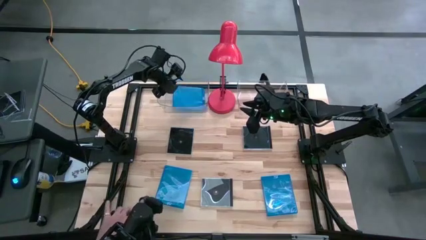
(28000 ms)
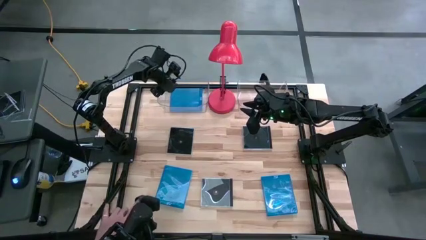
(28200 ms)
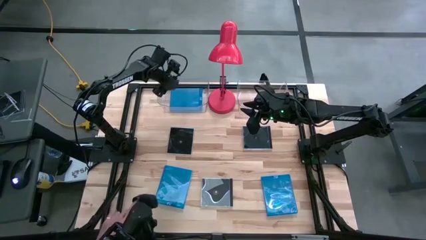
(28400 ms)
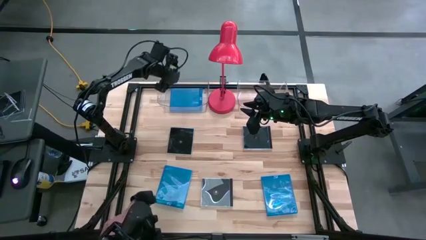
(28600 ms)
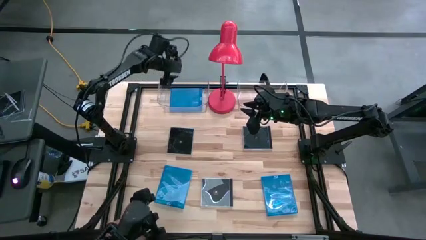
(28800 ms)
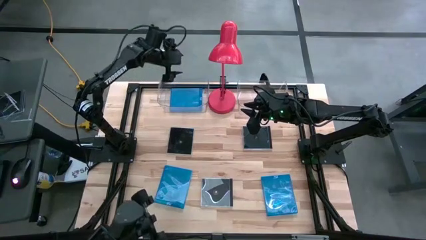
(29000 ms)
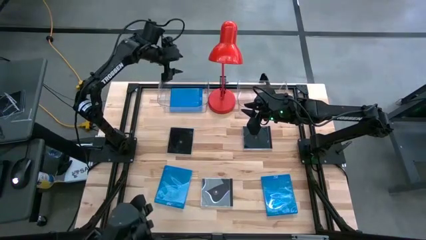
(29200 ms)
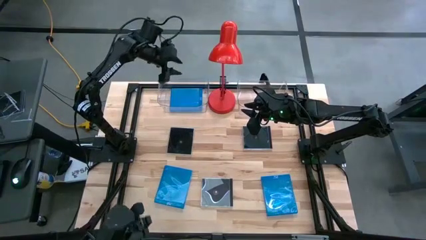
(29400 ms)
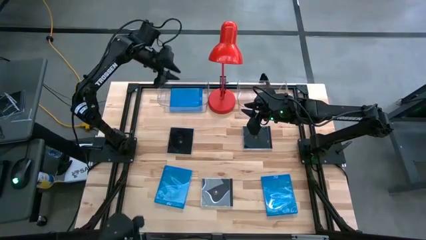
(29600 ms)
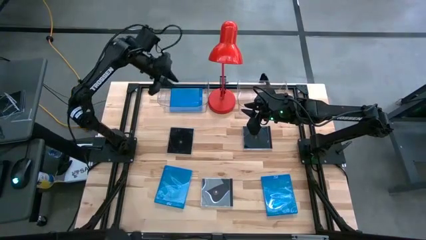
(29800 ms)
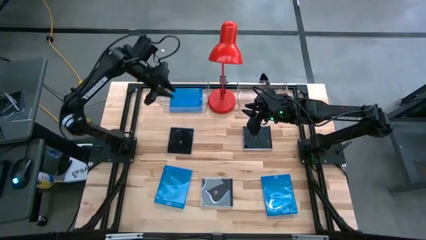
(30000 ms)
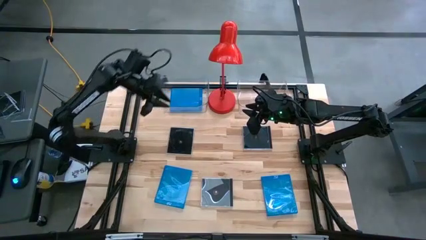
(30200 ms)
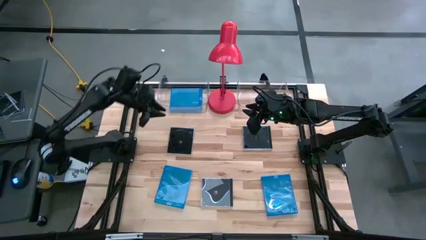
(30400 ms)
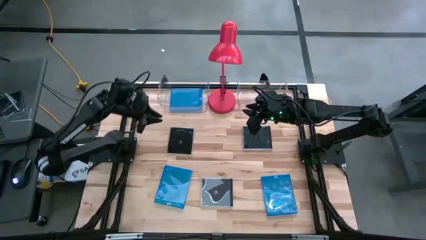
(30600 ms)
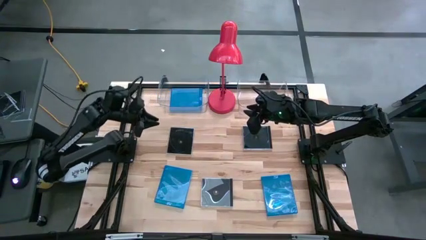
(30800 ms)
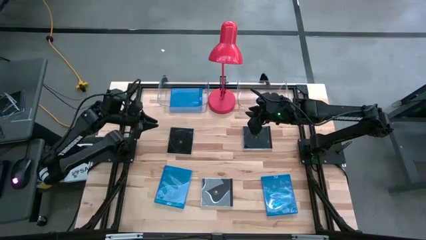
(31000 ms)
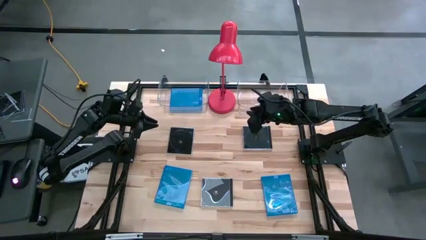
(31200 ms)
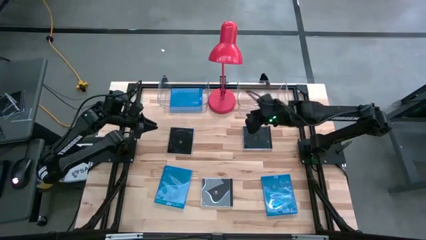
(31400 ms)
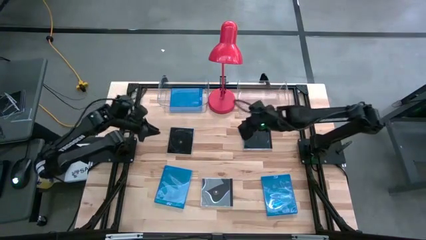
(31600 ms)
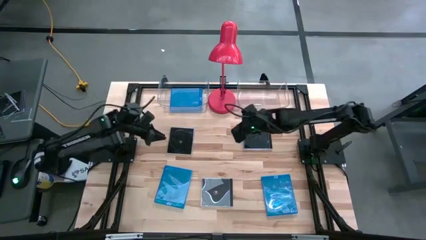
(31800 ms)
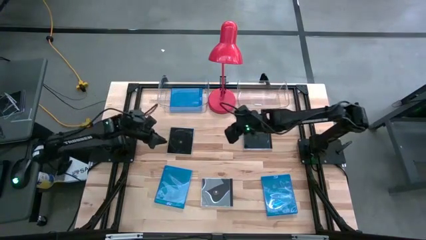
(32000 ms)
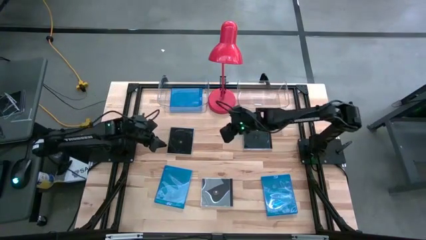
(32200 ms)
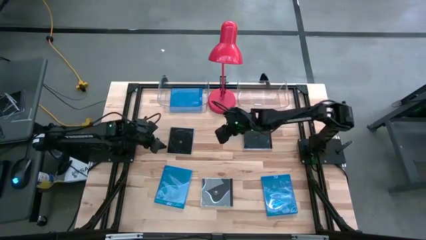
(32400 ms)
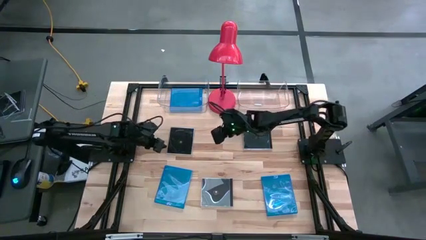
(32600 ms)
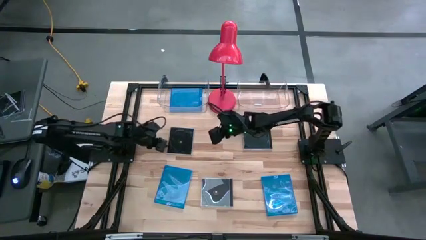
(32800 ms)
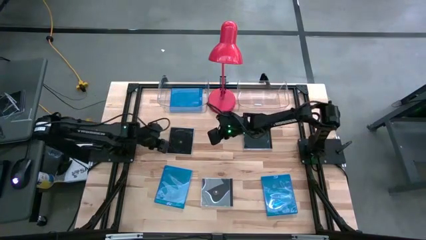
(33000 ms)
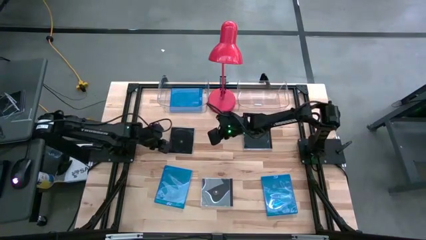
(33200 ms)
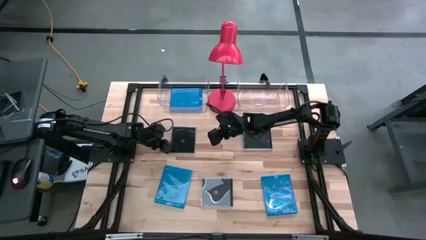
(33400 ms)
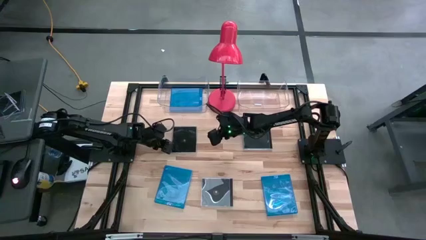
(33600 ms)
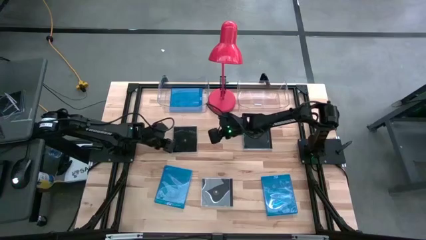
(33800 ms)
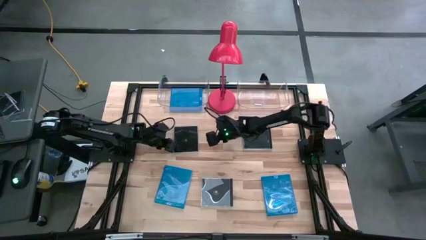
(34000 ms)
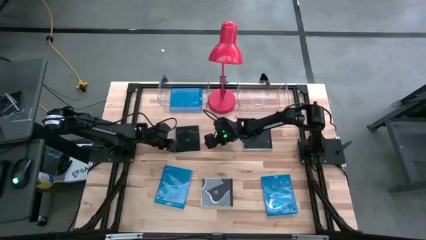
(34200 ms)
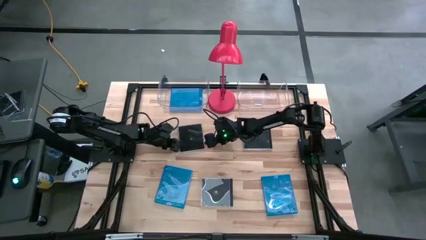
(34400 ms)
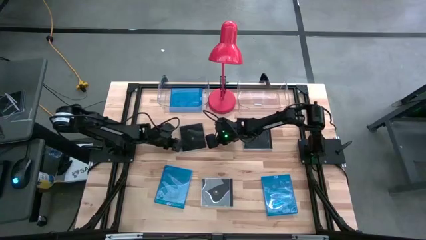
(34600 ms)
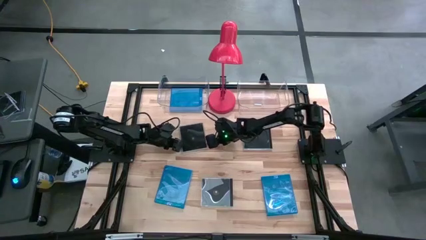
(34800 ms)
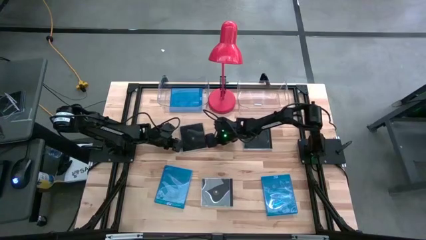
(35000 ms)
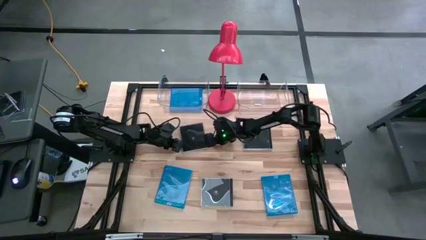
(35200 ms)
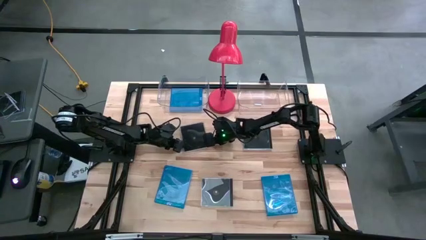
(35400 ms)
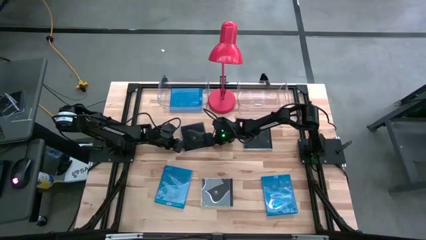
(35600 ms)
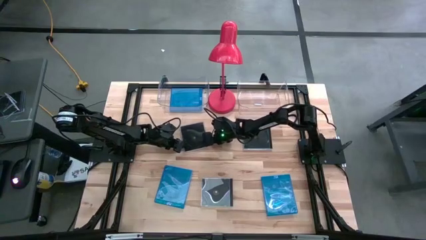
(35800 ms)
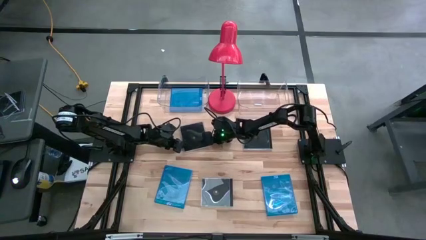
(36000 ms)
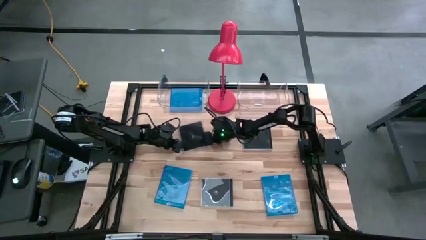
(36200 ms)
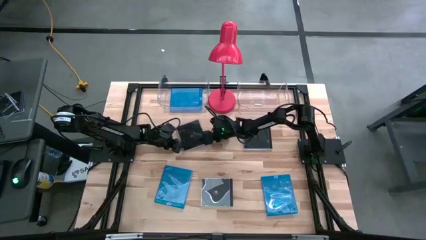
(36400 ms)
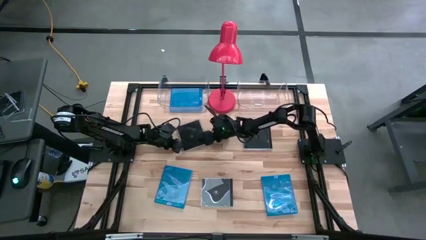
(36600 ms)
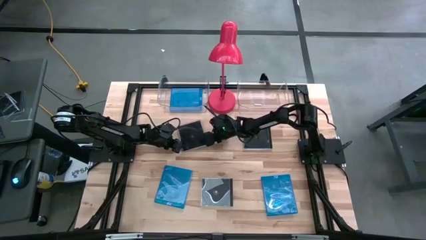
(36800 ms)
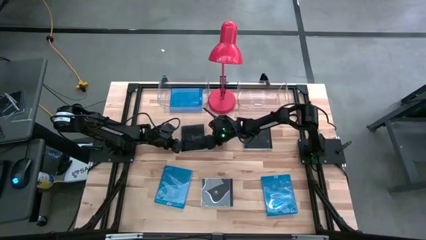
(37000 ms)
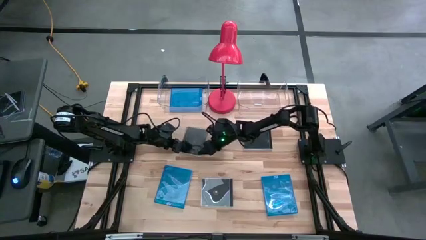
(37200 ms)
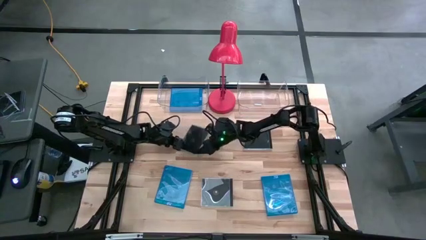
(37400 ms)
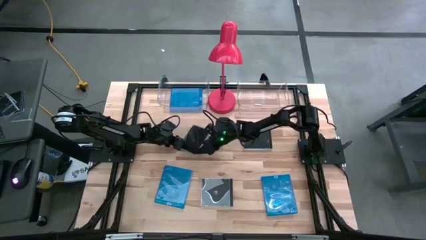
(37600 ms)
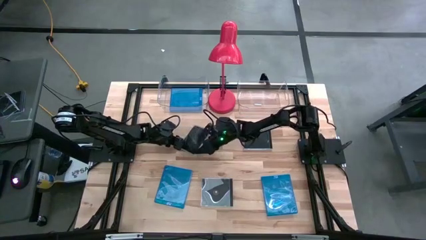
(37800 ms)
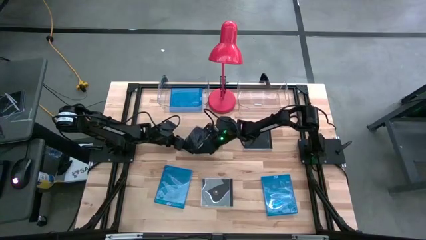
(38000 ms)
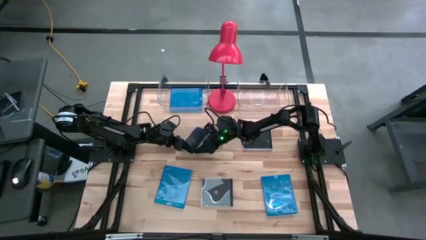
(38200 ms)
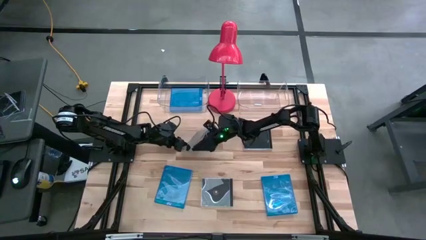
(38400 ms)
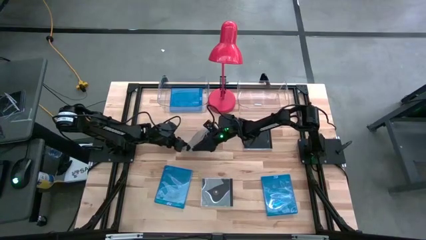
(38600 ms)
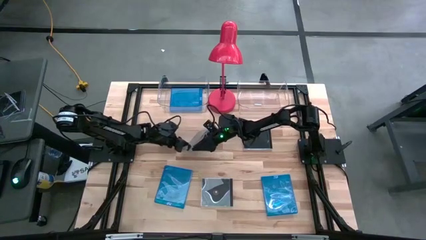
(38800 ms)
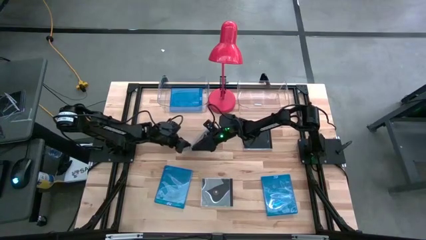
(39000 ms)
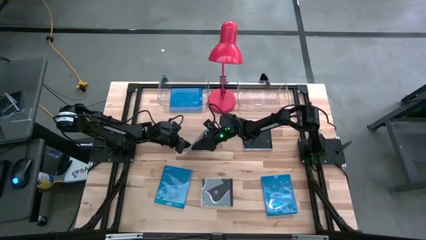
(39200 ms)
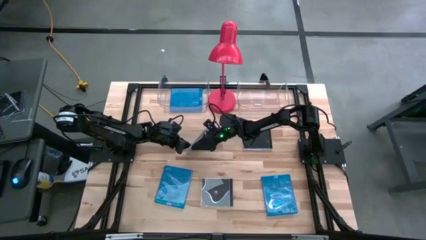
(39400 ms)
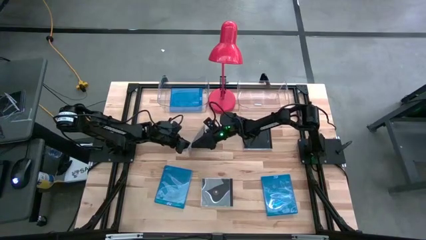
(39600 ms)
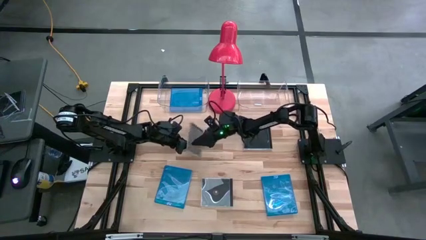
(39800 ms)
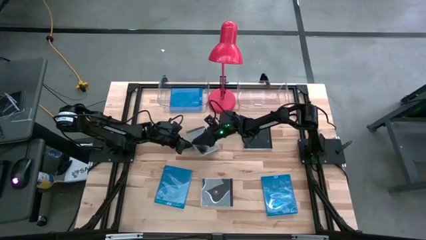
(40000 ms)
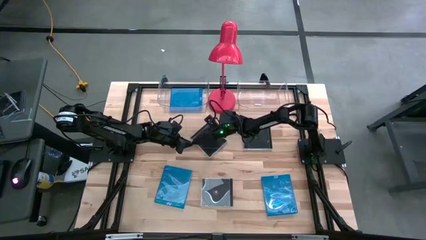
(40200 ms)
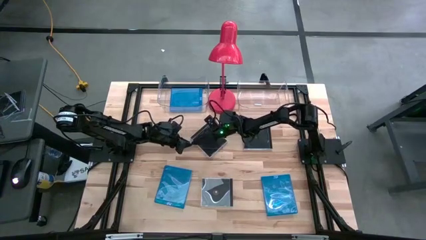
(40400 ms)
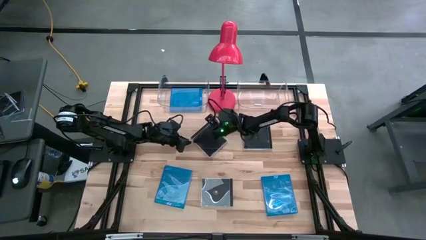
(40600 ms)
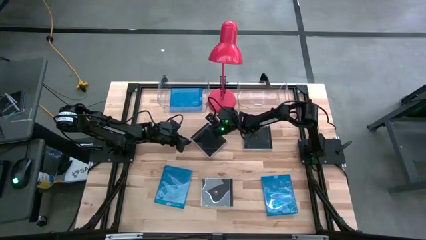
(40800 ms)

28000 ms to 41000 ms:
Task: Pick & place jewel cases by type
Put the left black cd case into the right transparent bin

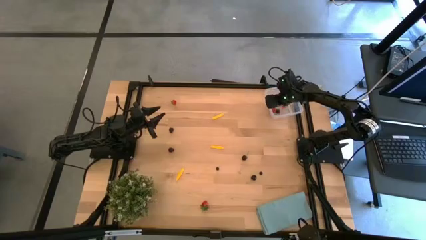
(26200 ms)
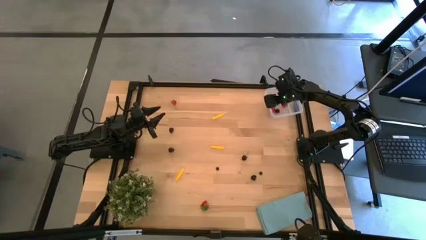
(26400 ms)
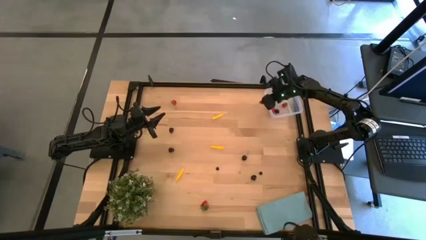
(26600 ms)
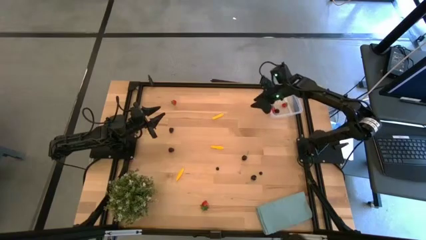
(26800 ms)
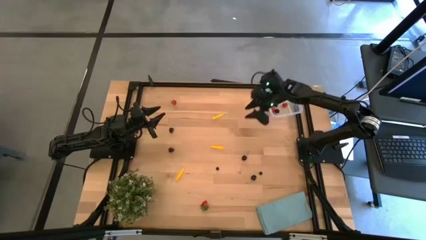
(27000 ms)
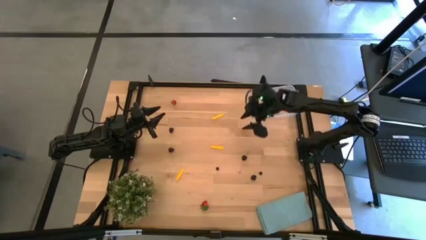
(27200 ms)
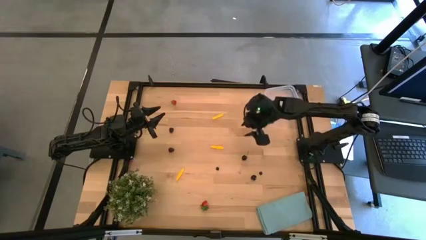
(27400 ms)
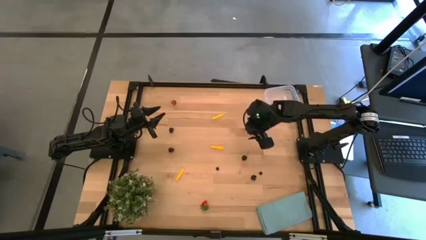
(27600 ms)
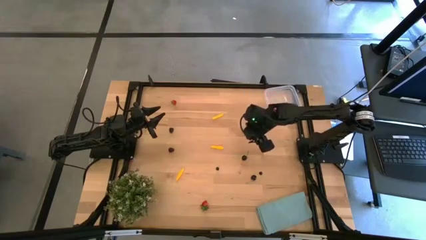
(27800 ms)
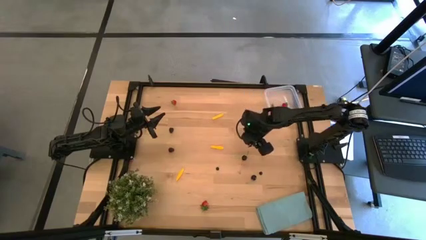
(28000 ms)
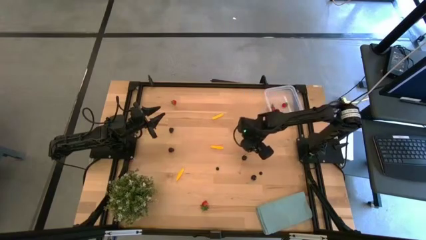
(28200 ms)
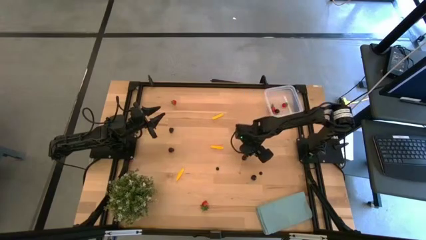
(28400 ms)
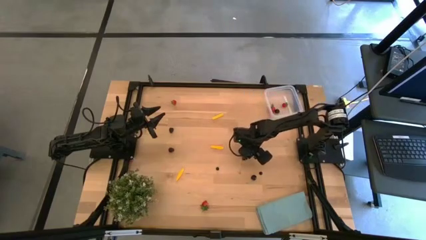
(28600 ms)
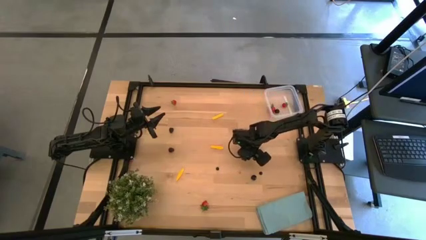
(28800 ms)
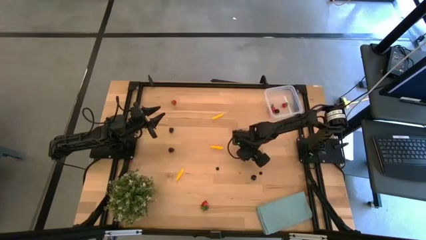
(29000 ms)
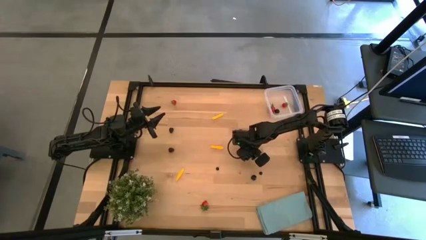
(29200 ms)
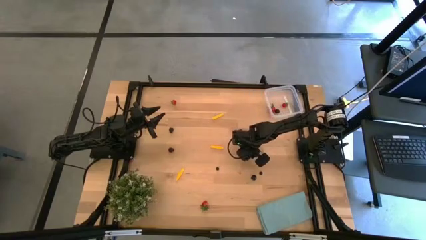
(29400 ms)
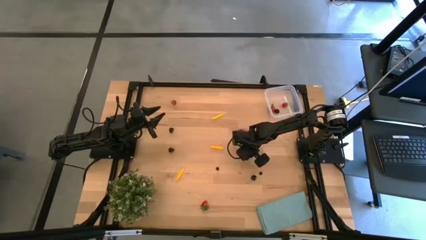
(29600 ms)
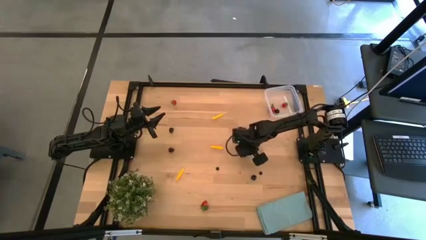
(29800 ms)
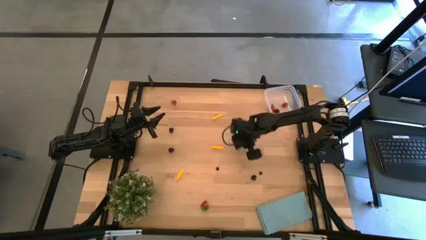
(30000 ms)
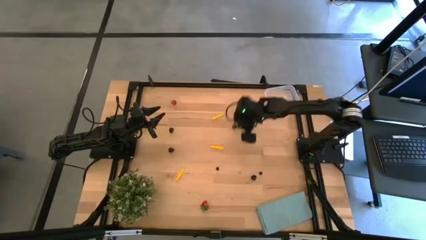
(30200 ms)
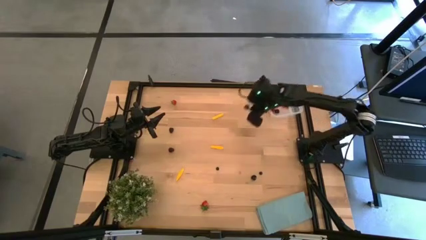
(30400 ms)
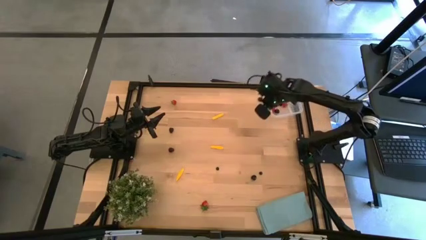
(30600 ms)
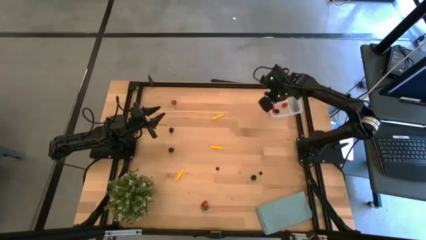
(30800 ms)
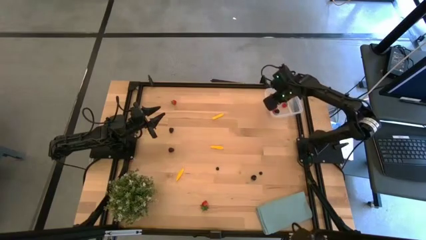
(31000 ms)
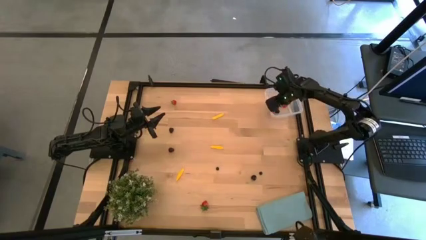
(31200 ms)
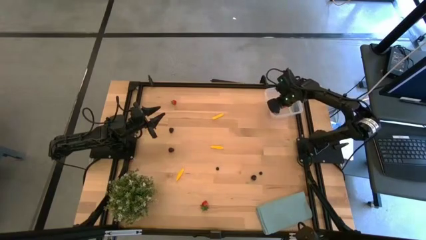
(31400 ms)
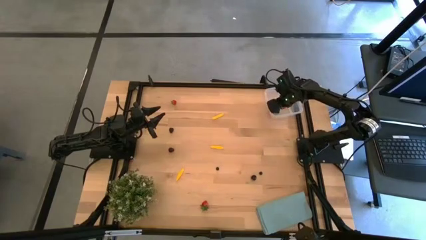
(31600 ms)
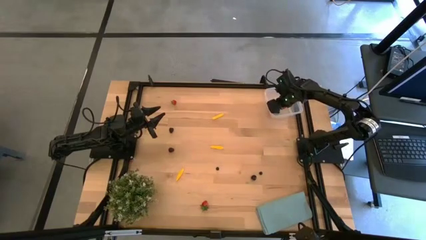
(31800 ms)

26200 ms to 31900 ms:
Task: Pick and placing Produce into tupperware
Put the black cherry into the transparent bin
